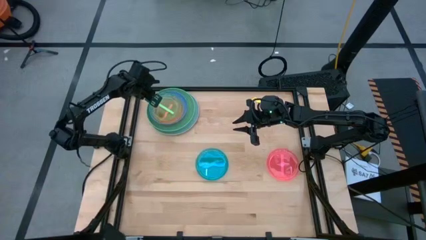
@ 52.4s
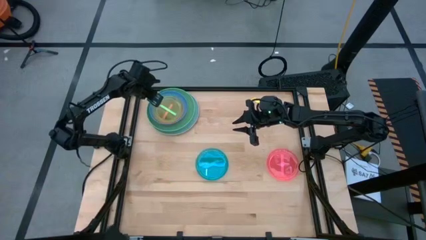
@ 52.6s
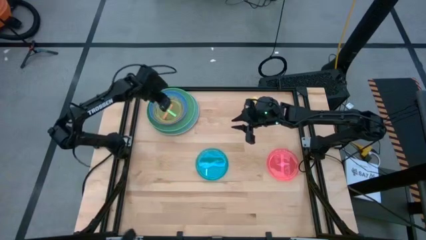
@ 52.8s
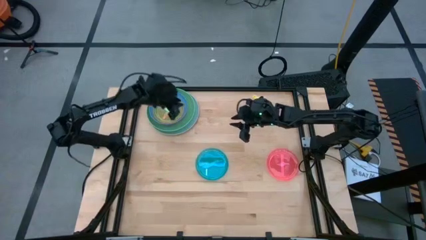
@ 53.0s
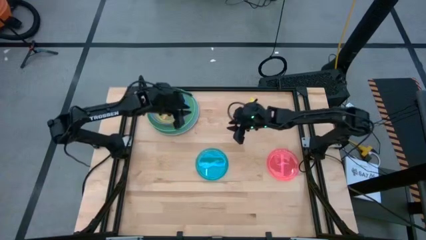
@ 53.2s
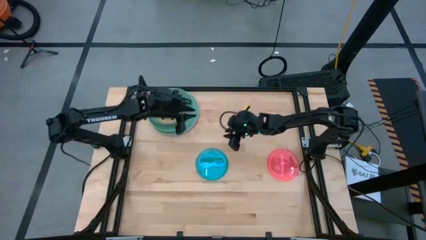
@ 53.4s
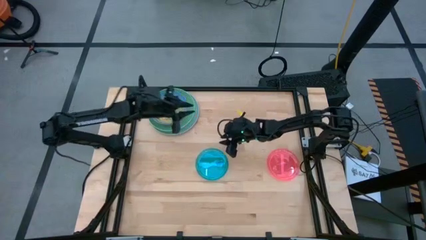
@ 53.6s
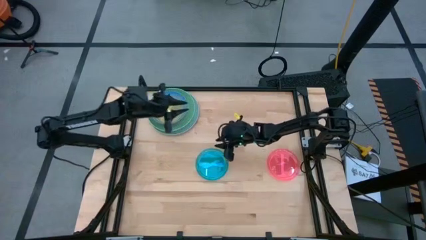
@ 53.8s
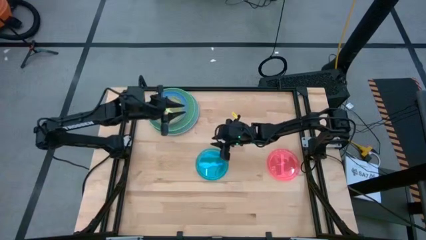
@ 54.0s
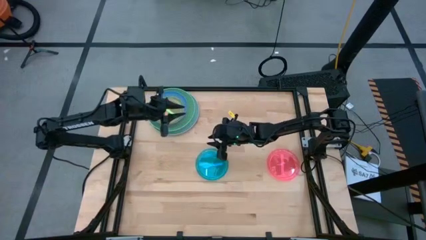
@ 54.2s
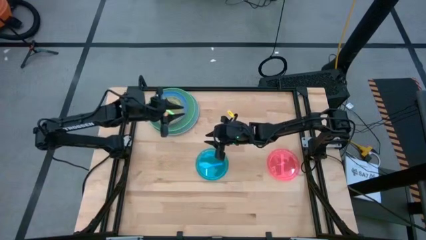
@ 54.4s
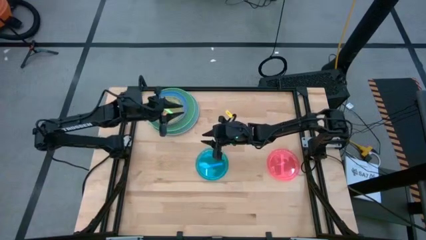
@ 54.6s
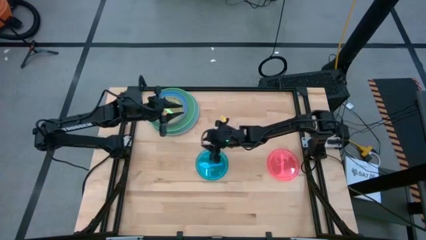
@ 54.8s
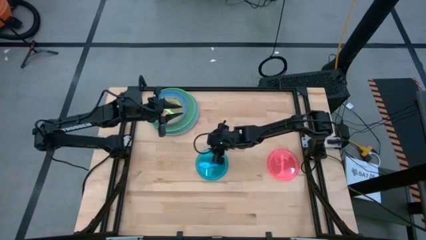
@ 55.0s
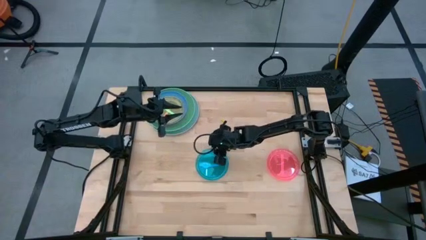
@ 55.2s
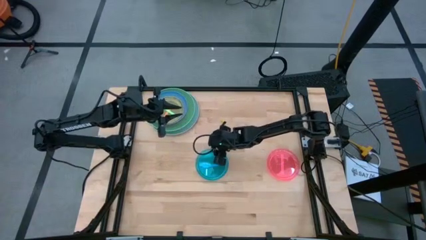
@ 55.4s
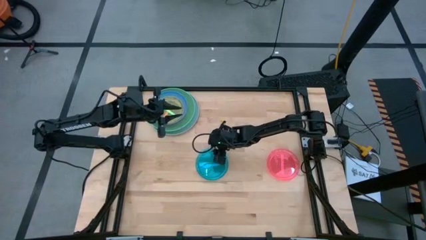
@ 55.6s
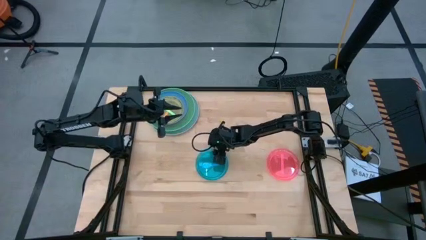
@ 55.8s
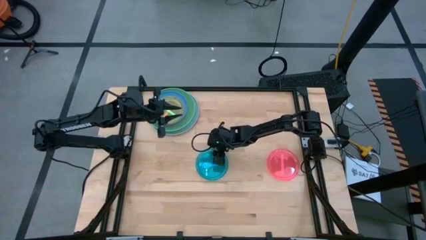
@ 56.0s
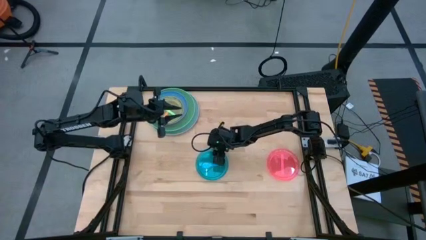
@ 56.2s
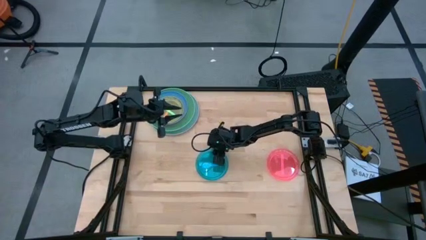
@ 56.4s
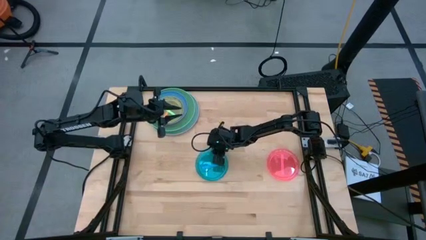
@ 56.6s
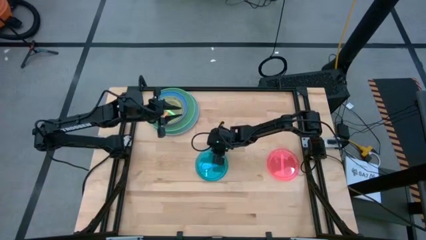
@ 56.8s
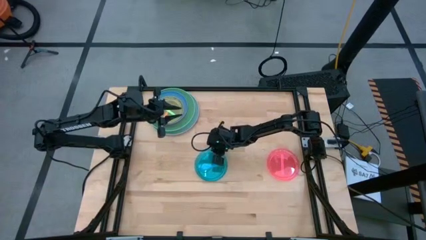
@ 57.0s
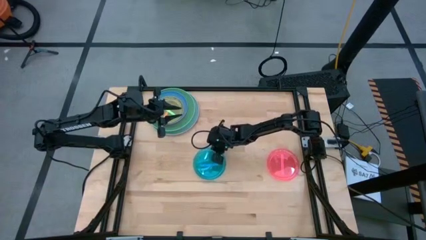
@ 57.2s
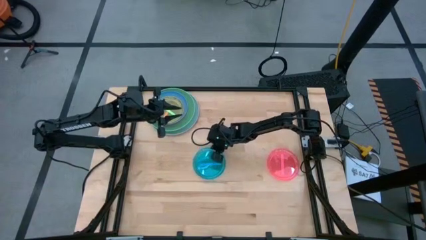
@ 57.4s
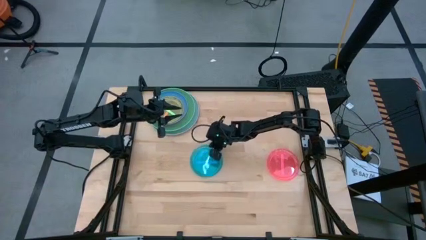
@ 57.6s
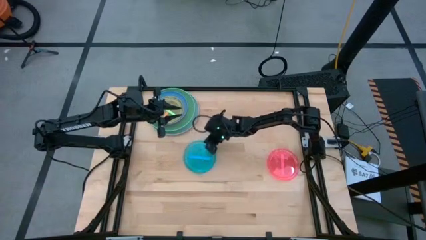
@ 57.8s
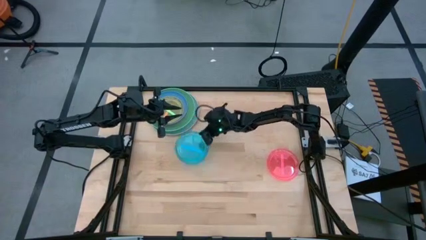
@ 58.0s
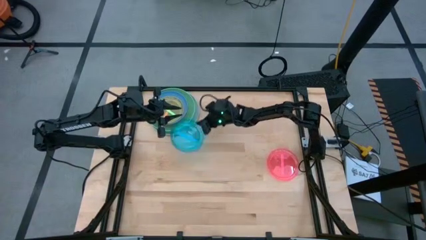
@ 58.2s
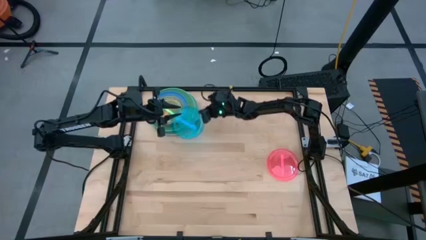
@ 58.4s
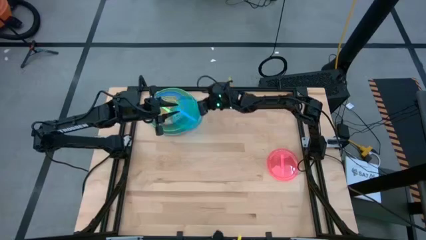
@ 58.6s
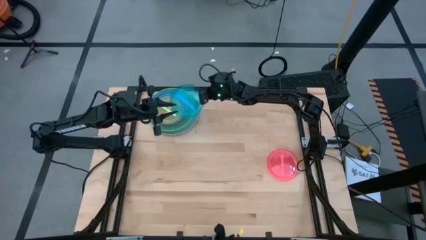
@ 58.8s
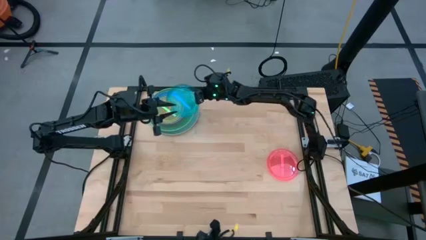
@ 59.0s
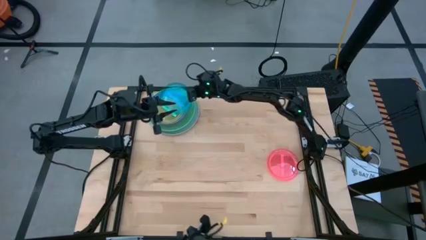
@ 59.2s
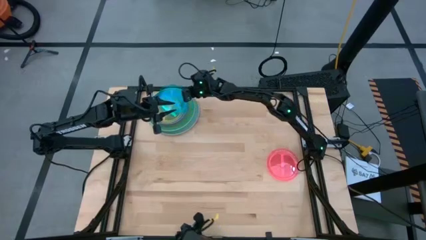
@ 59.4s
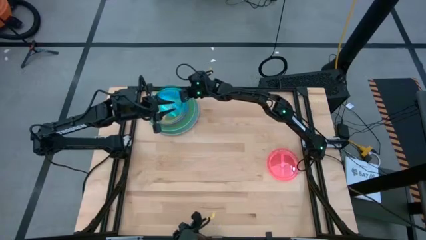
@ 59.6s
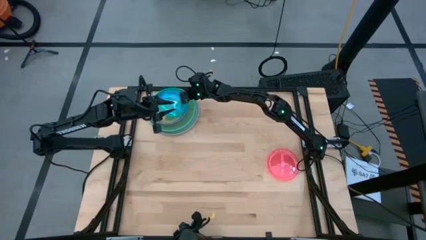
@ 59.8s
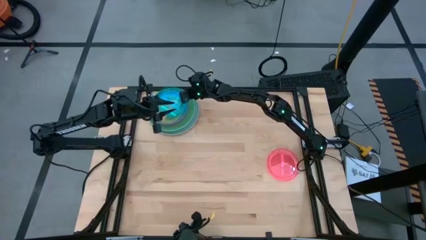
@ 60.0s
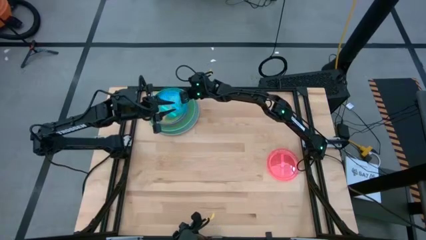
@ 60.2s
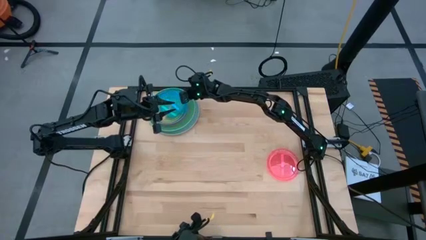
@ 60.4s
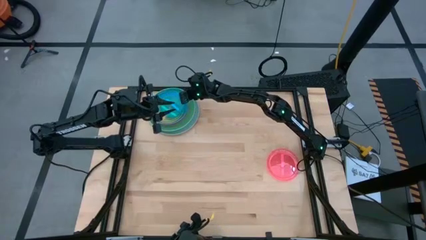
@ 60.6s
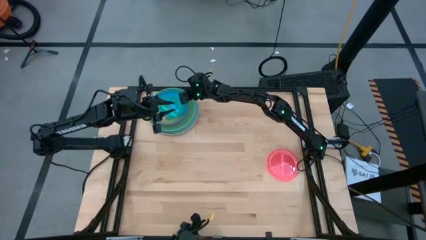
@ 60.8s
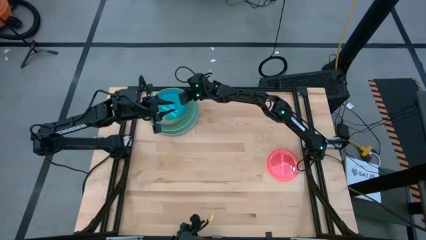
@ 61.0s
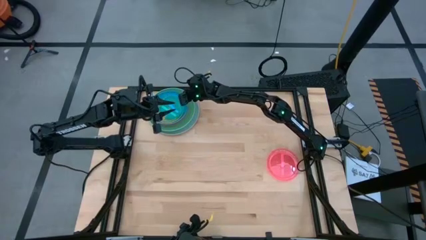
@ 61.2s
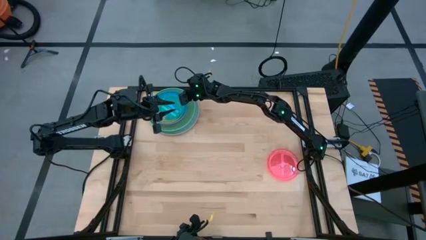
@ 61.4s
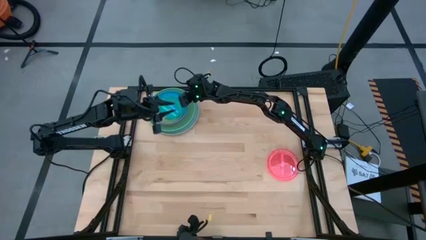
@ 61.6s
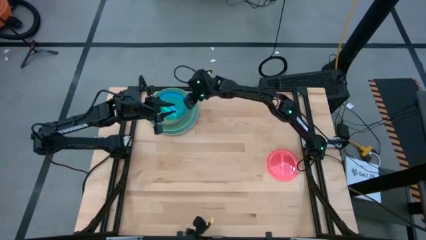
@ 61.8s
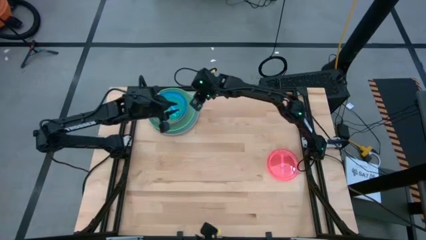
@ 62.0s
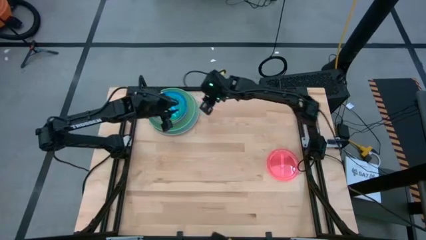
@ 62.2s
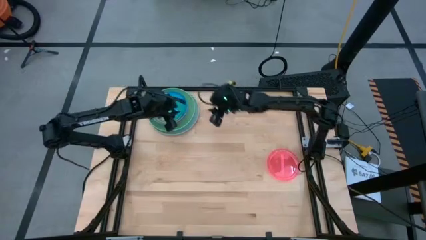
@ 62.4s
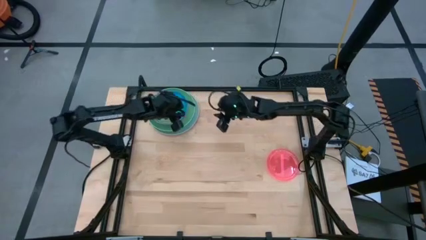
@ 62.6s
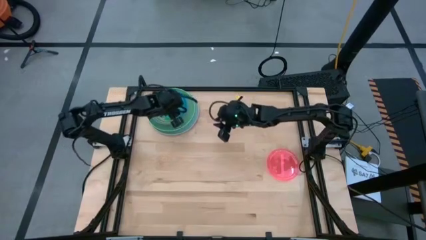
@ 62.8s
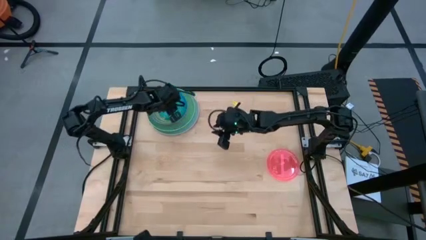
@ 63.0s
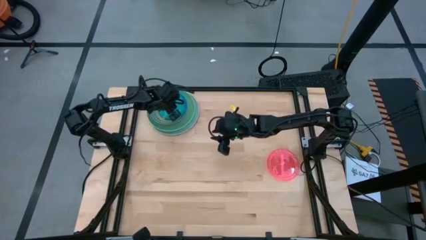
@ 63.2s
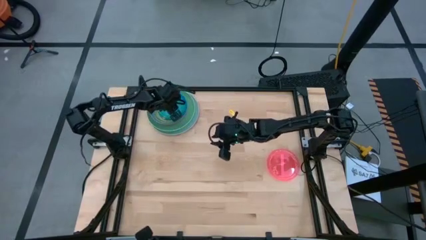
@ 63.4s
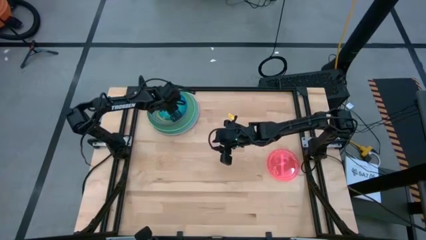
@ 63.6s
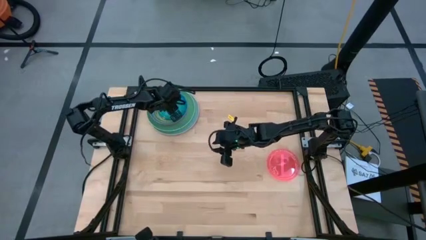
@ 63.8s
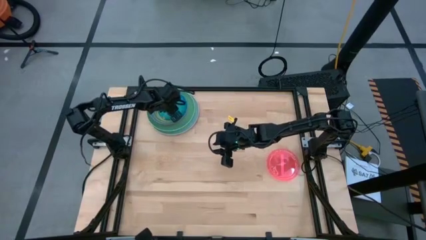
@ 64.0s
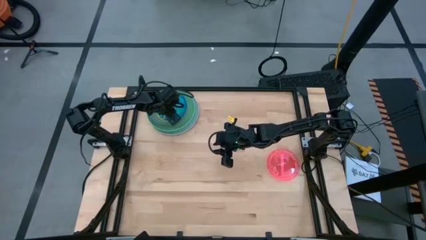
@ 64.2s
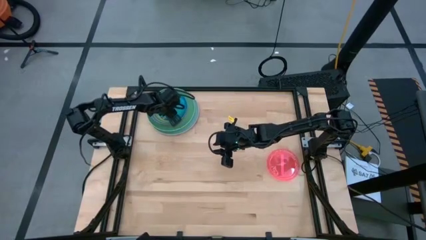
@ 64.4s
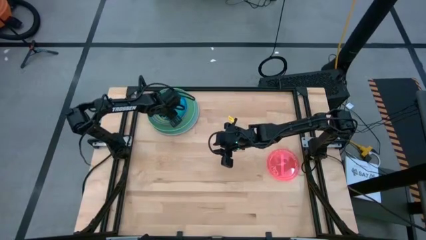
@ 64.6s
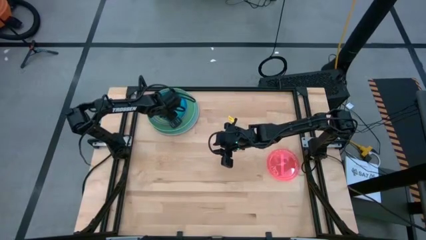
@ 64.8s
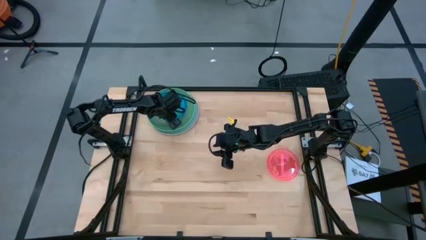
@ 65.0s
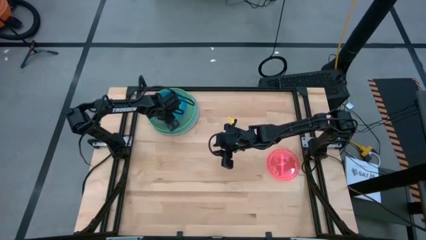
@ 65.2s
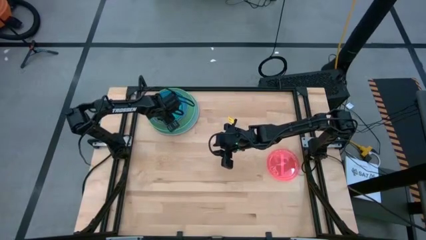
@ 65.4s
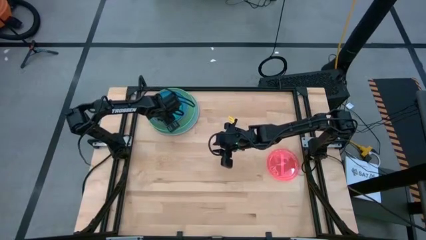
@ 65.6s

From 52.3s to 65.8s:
Task: Stack plastic plates
Stack the blue plate on top of the green plate
